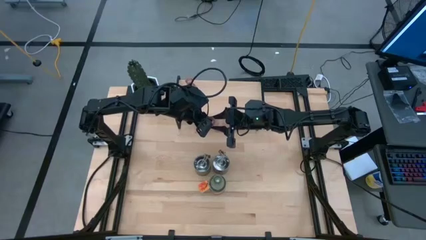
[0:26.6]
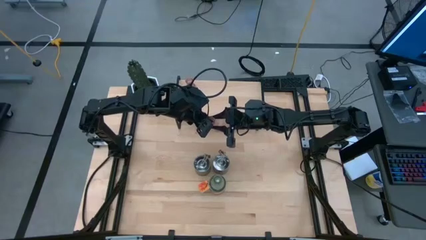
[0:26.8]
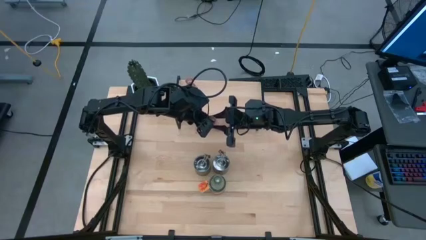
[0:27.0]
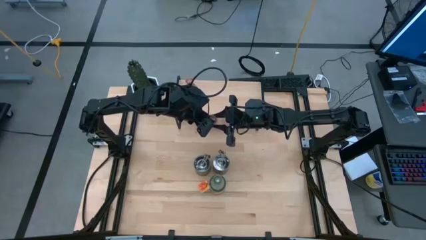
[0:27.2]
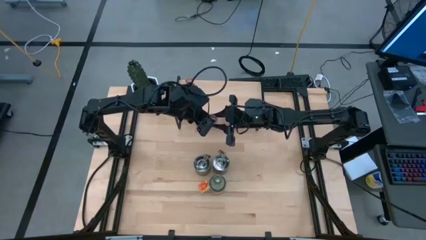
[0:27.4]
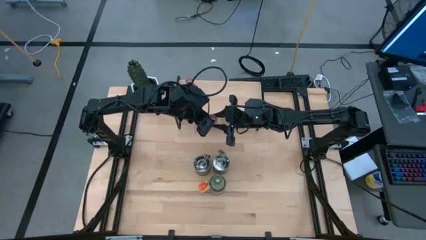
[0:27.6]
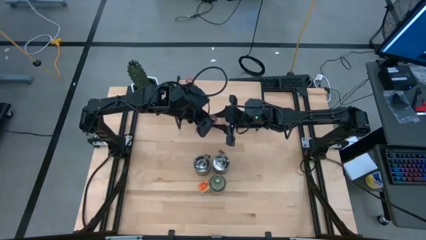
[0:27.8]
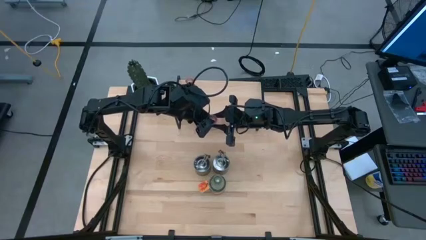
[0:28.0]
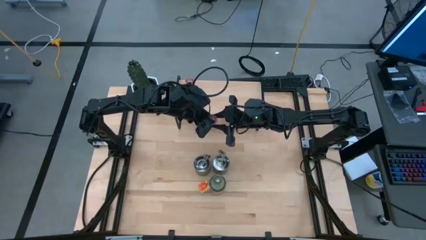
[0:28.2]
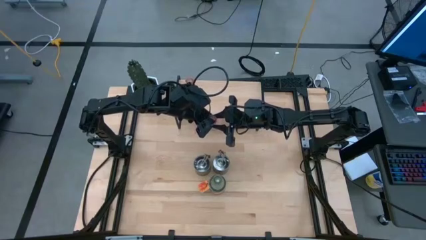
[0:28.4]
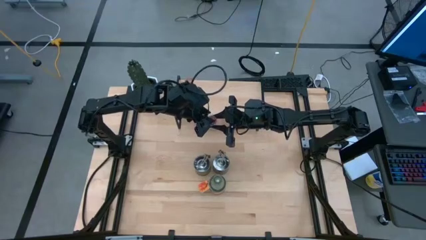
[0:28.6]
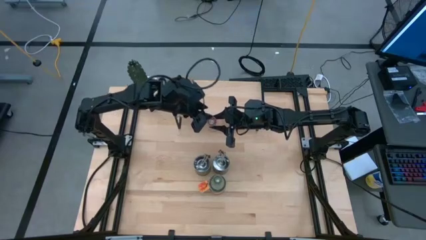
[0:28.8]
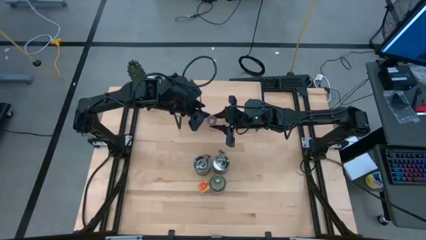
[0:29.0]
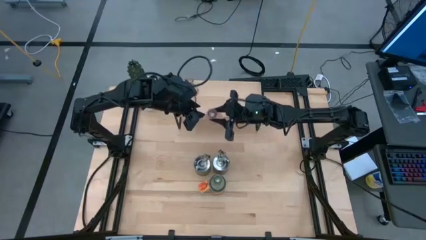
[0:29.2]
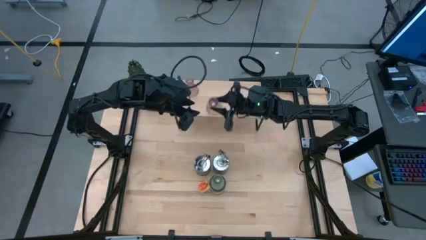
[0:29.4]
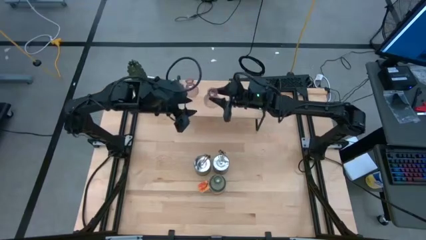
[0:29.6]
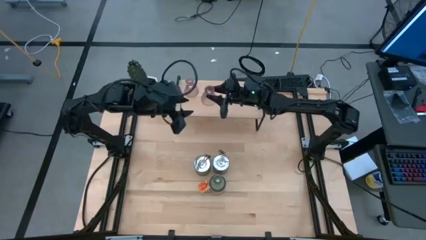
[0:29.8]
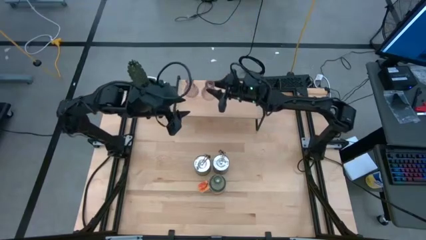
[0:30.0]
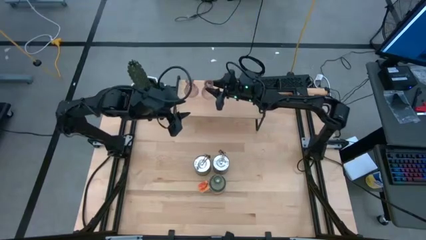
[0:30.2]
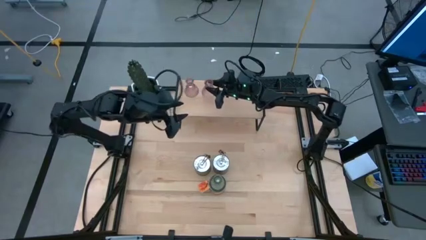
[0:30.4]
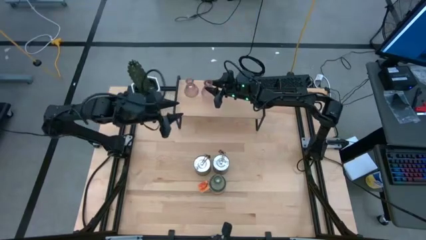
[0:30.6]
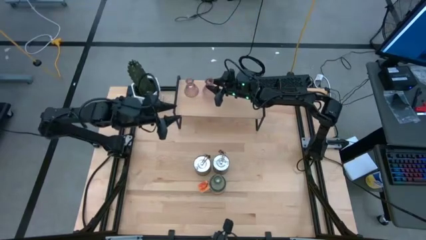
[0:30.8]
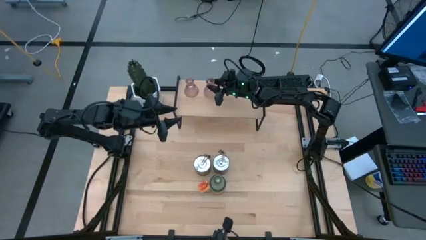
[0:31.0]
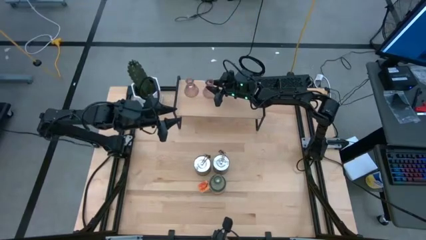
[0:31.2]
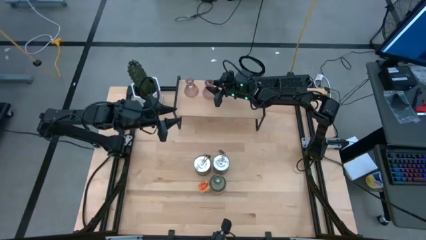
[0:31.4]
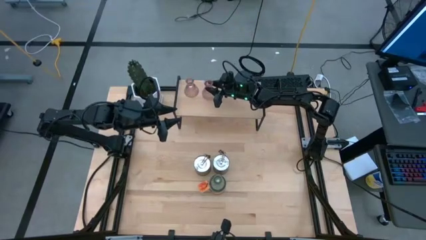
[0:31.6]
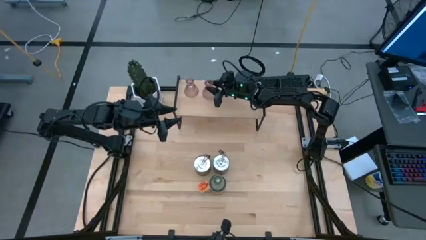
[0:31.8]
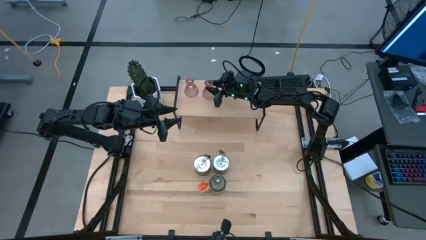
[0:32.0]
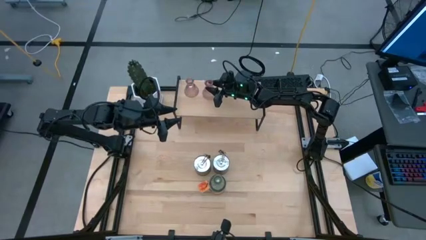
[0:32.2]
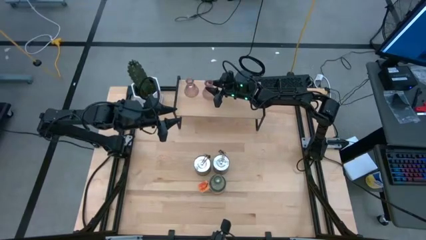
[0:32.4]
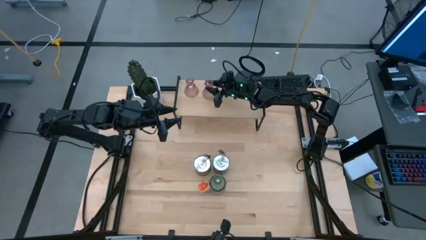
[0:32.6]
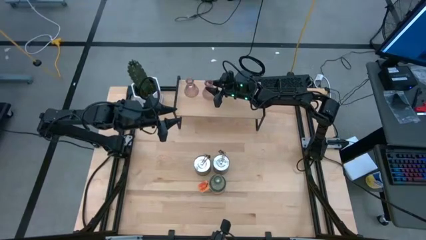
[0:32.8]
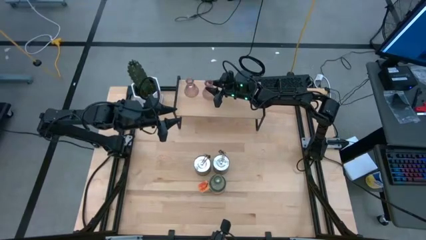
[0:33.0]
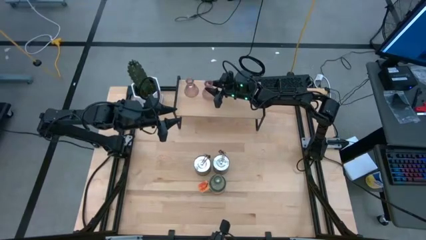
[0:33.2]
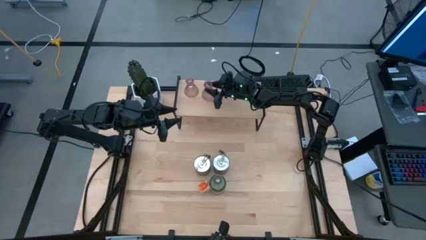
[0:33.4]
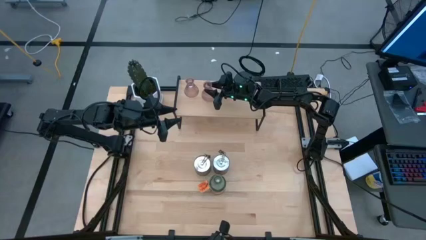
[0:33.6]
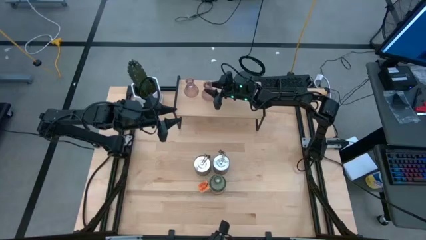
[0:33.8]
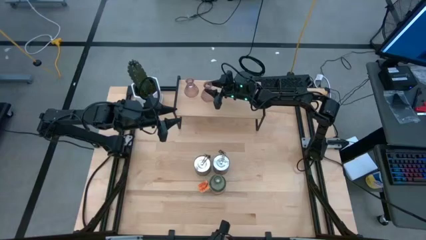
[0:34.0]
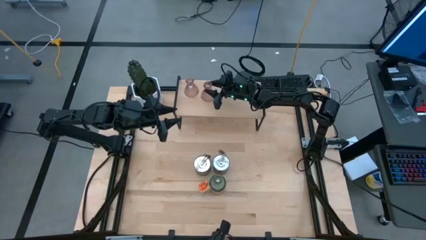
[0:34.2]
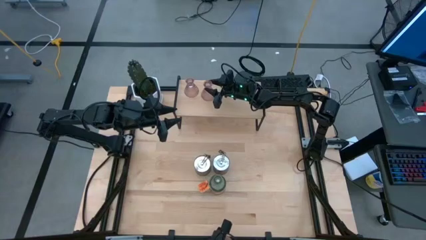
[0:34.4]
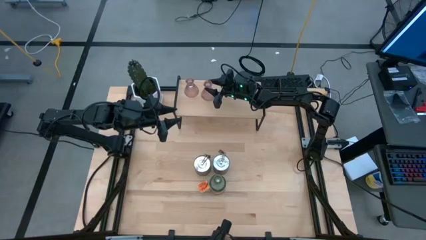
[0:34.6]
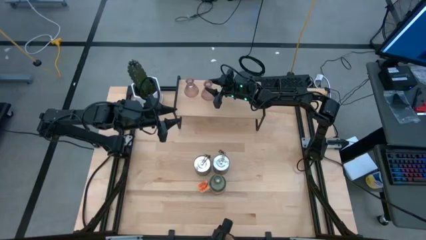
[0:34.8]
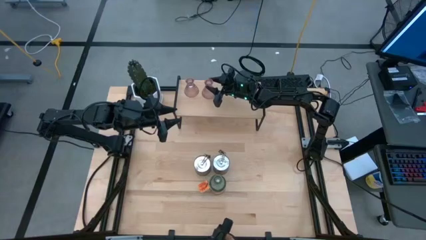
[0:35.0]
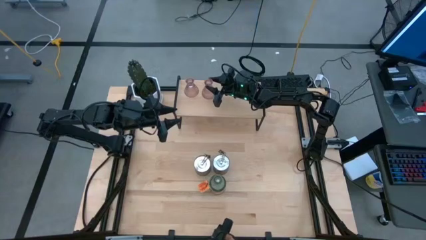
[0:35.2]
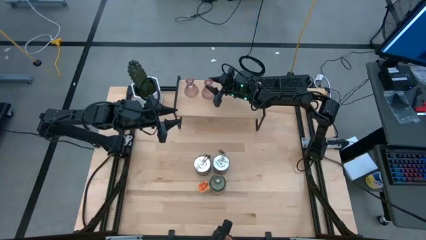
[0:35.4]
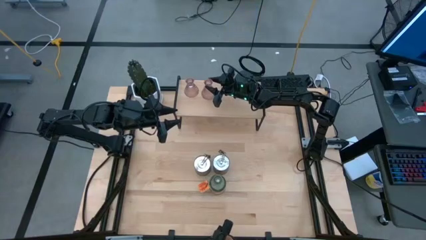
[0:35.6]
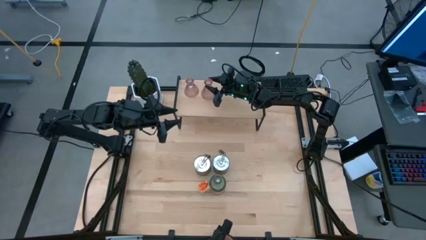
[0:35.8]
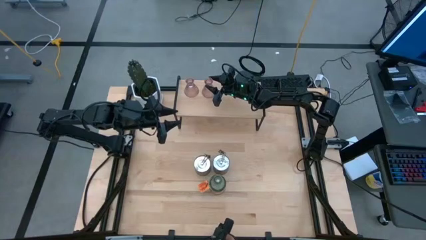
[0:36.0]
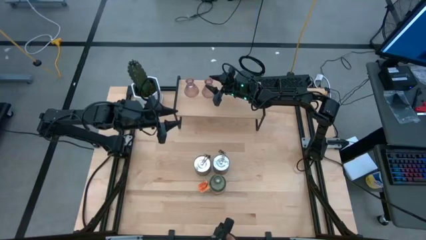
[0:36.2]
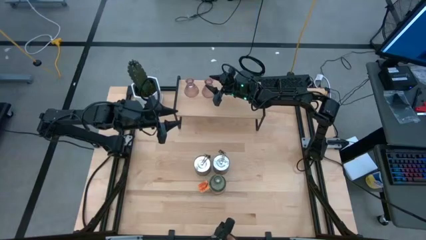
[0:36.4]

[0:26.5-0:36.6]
Task: Pick & Place candle stick holders
Put the pink glass candle holder on the shelf
